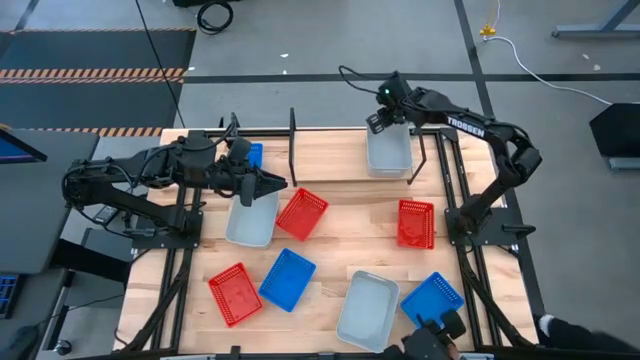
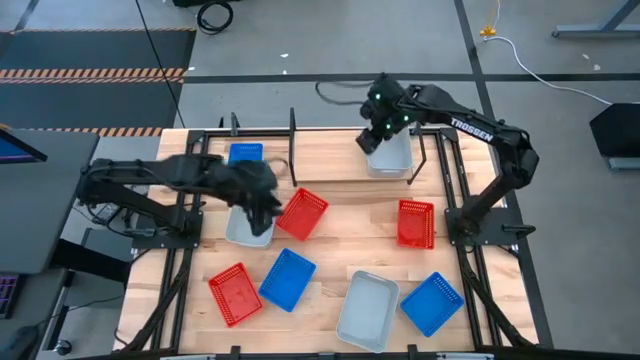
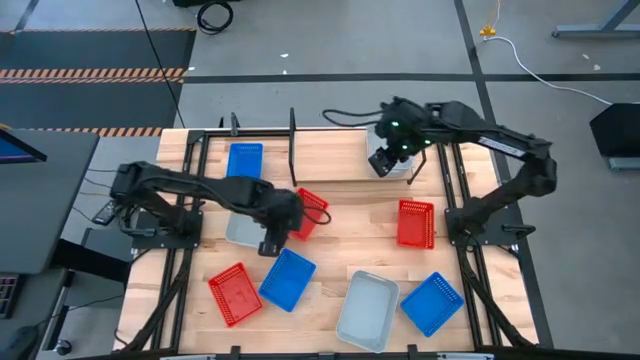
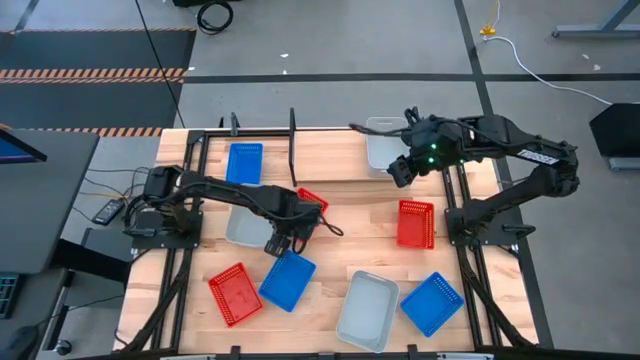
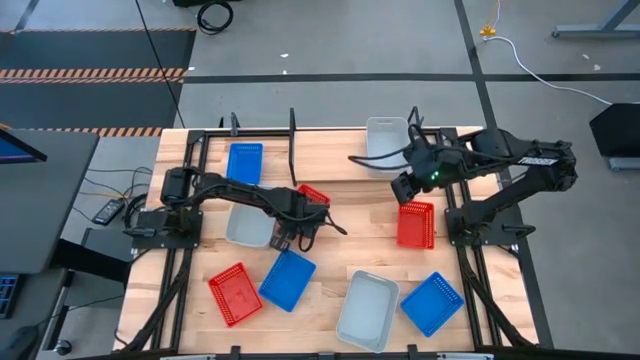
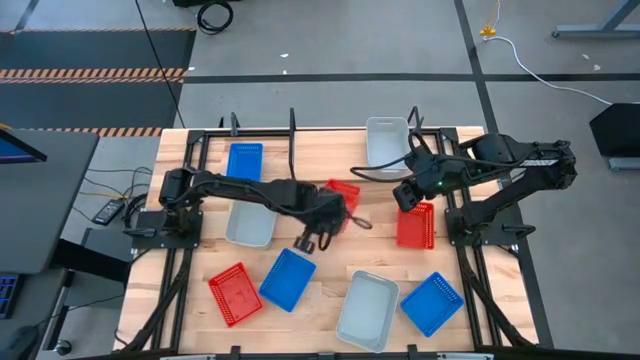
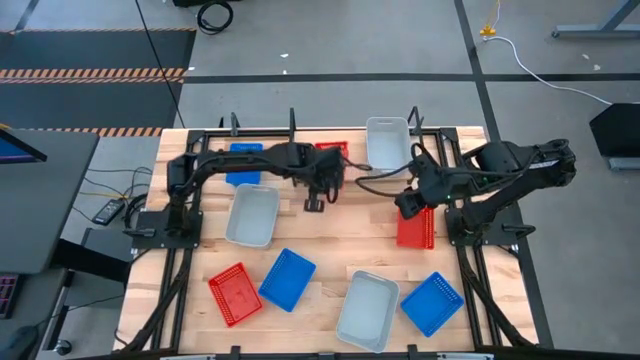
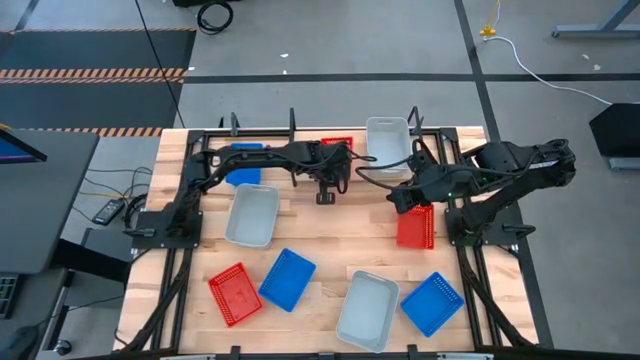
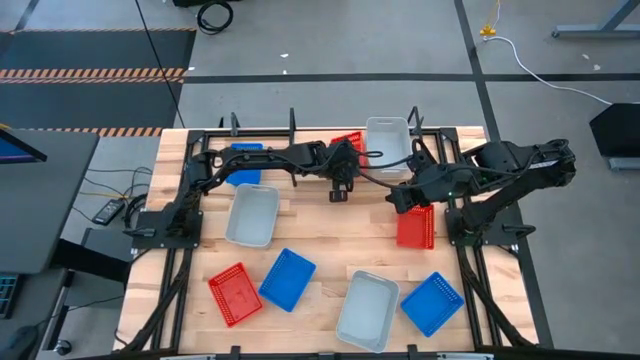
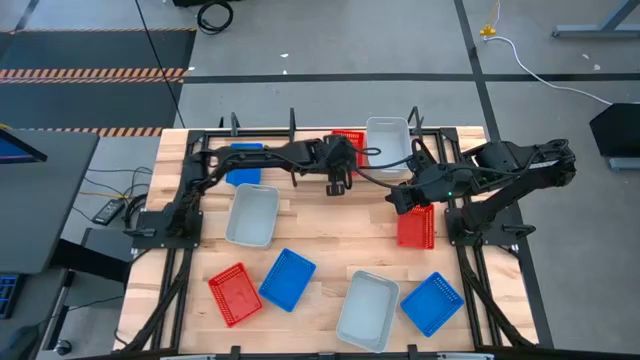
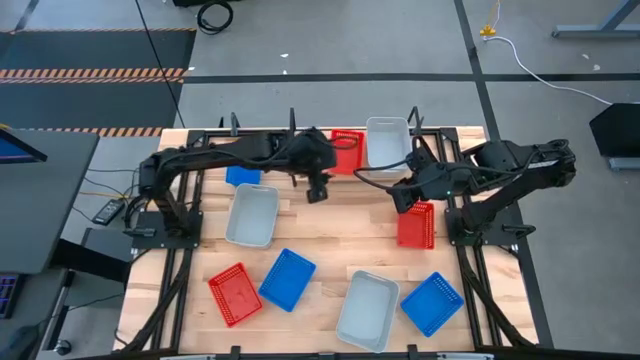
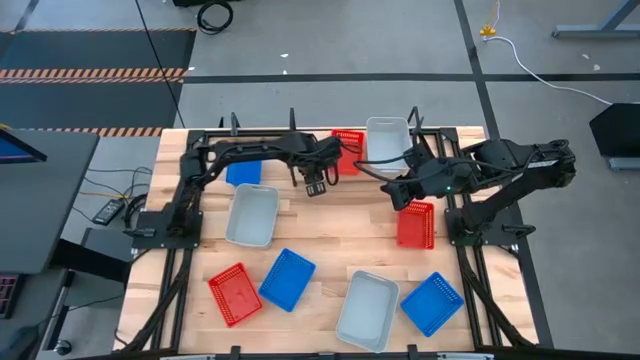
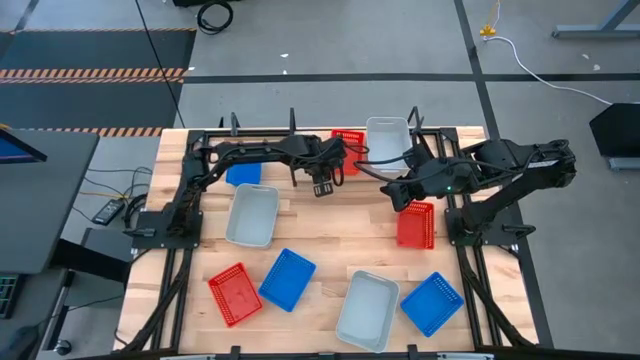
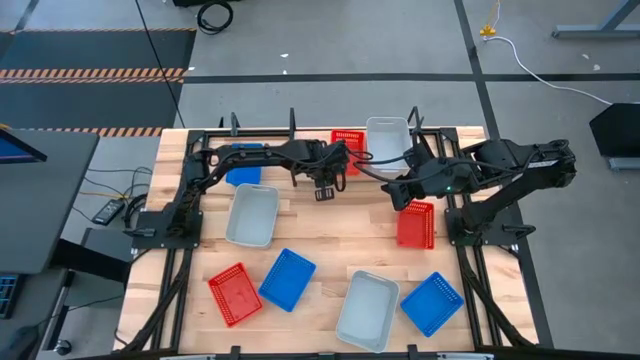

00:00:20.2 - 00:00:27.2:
Task: Stack baskets on shelf by color
Put the top left red bin on the shelf

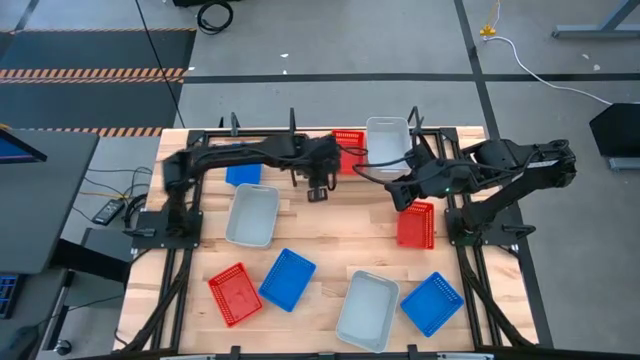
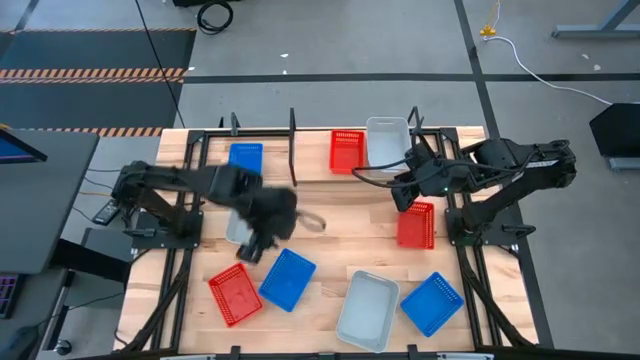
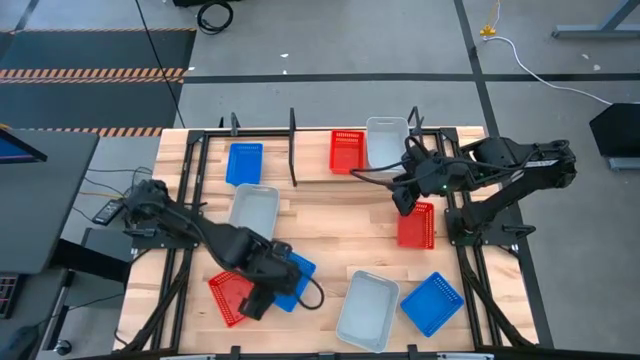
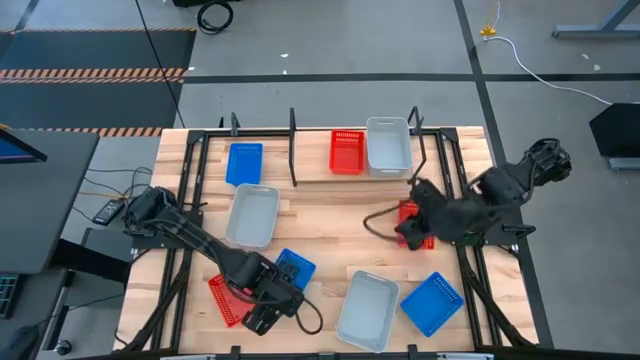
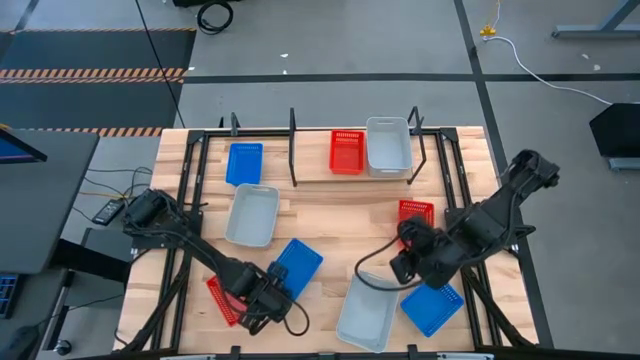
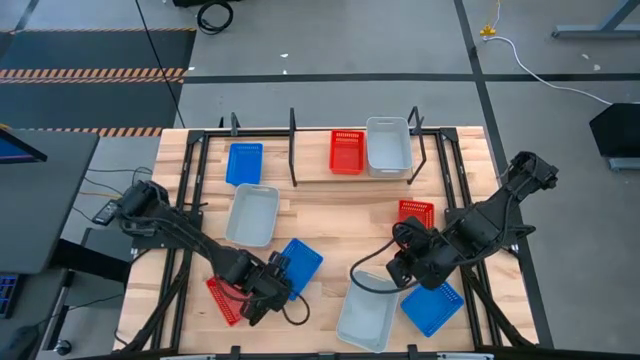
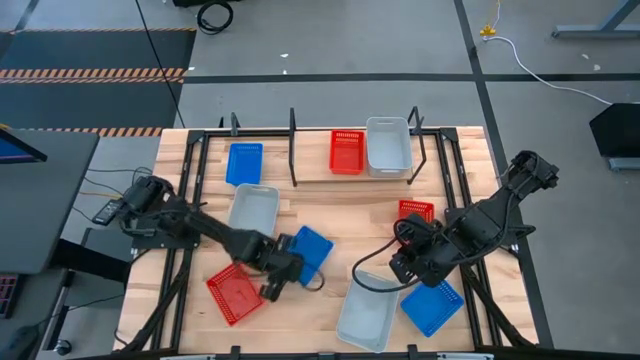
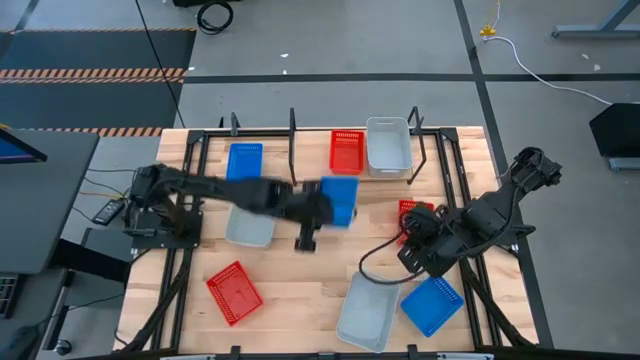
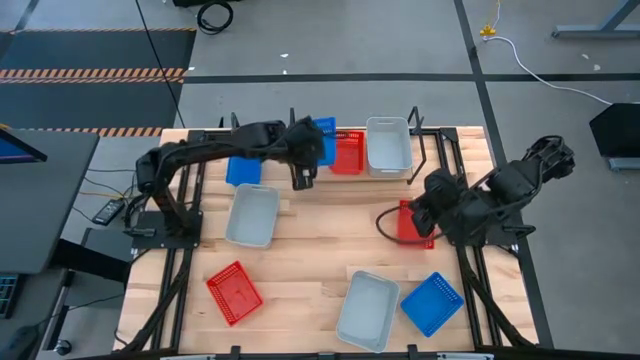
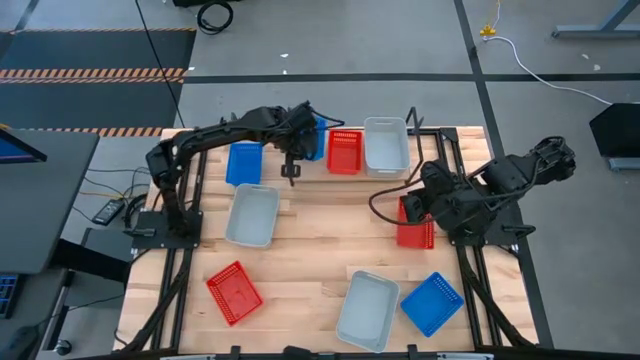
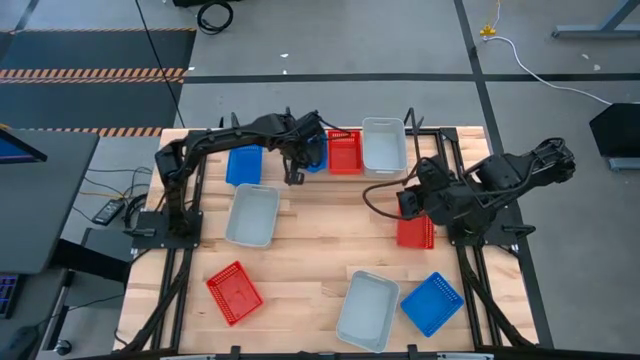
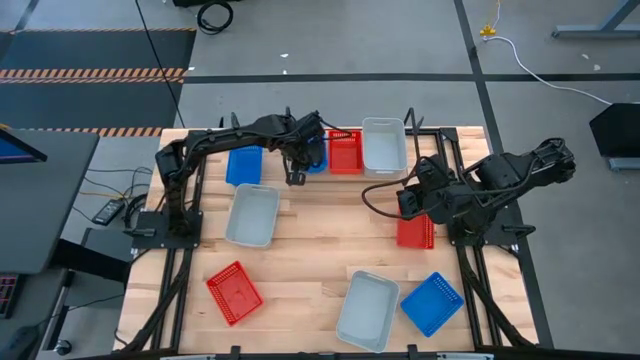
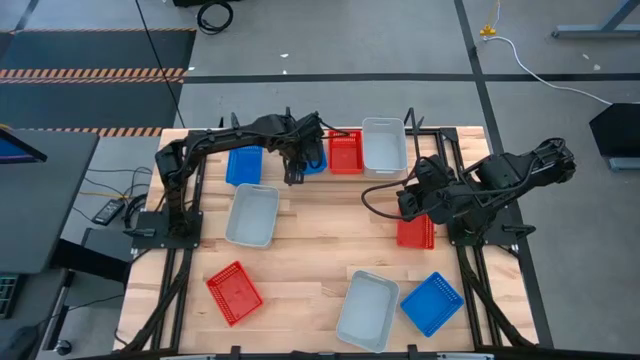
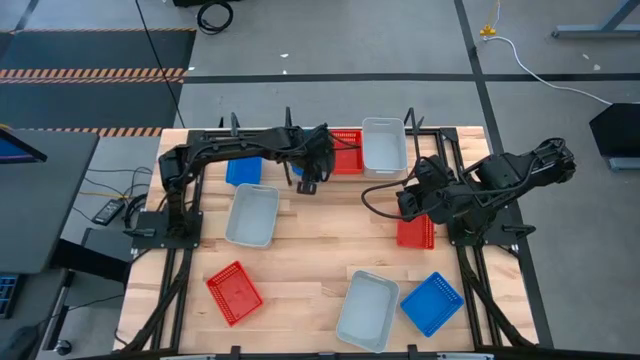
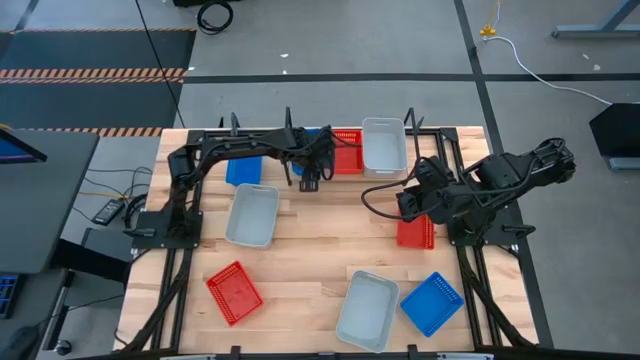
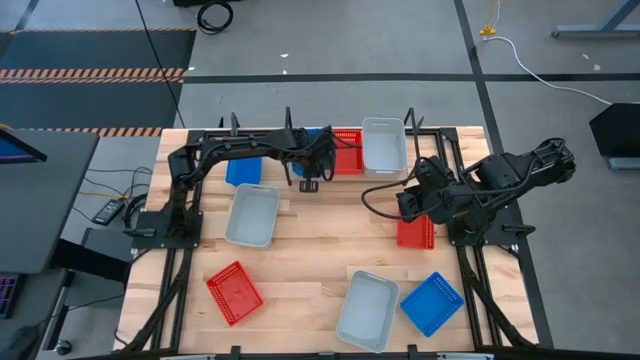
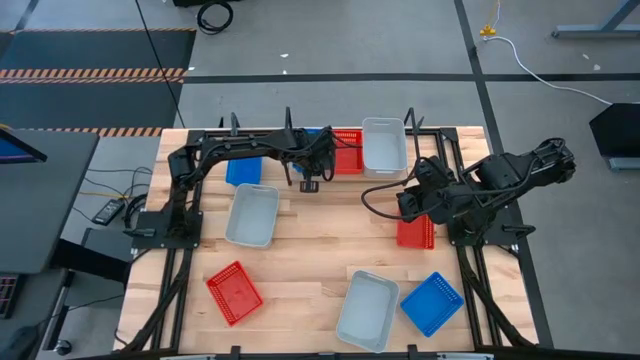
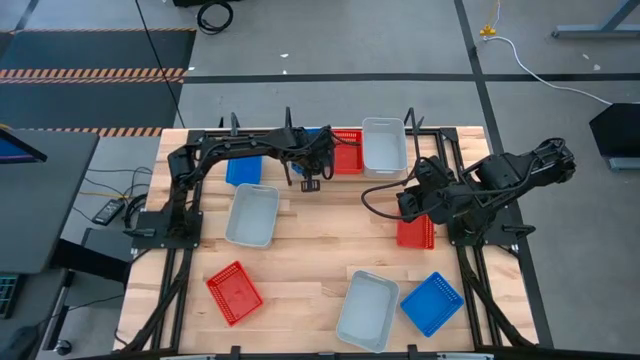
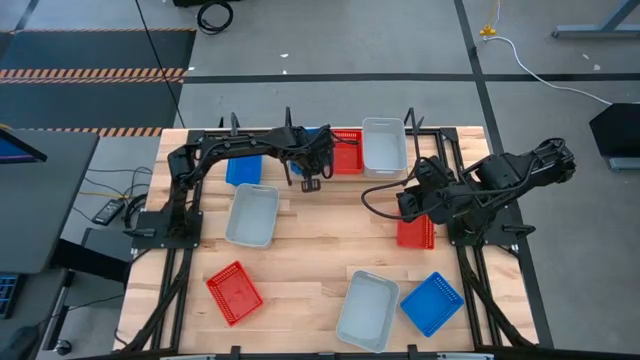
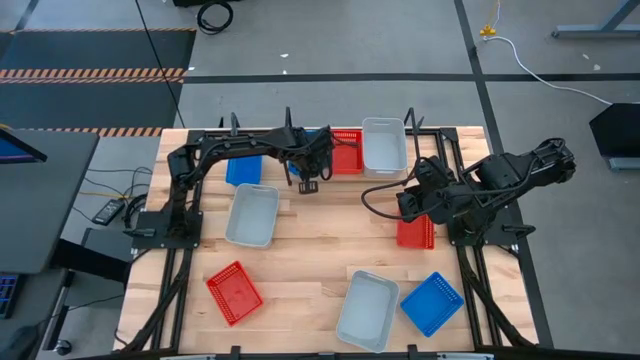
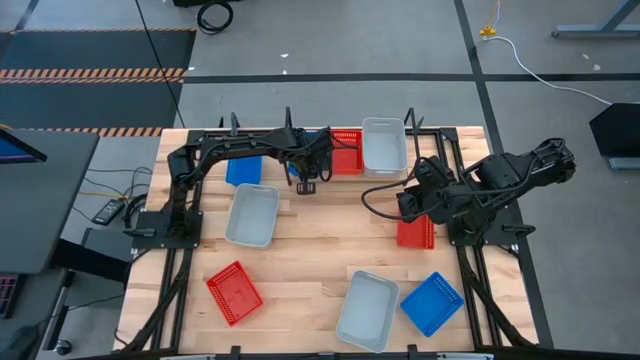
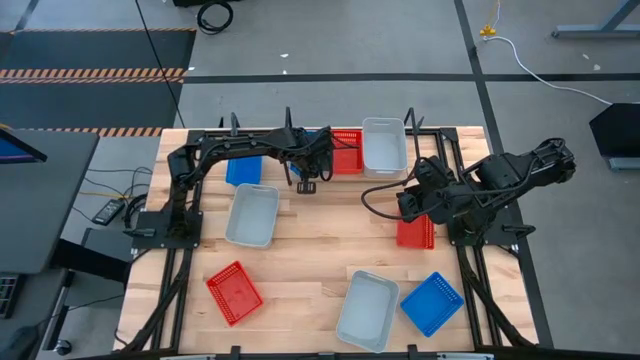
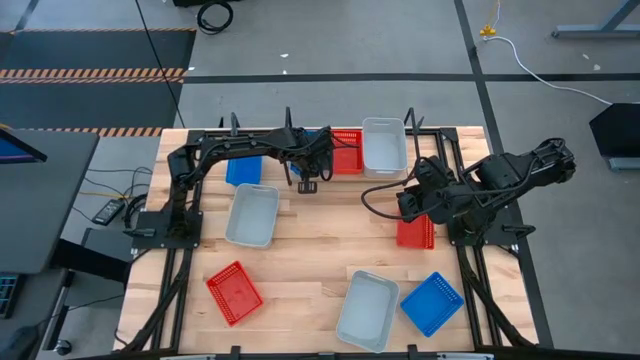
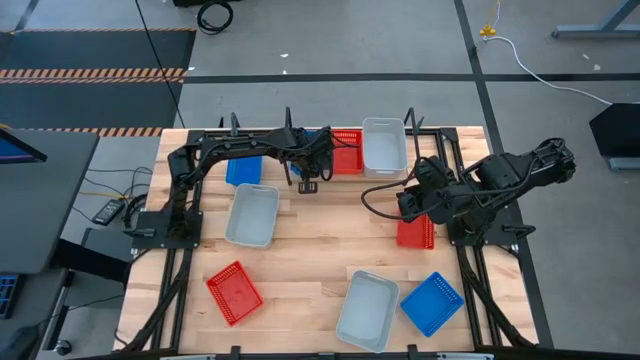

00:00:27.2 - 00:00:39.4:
Put the bottom left blue bin on the shelf
